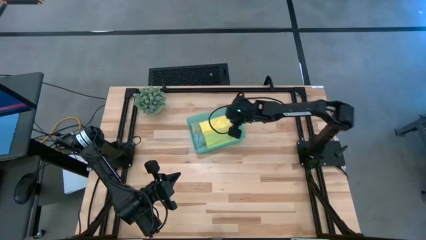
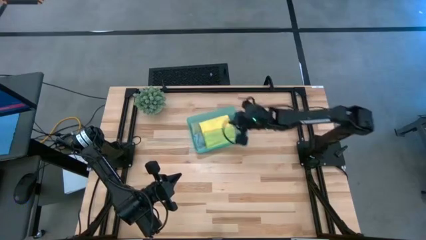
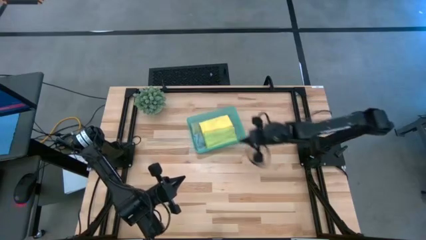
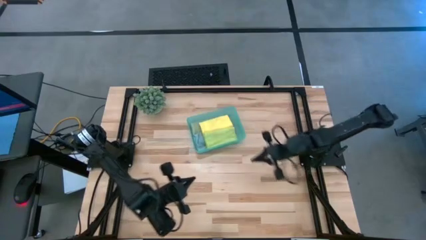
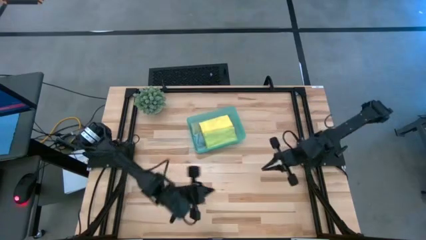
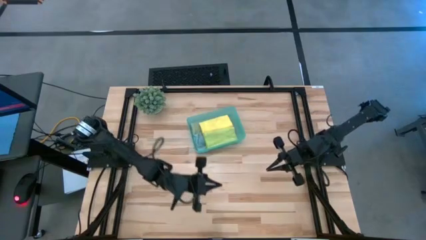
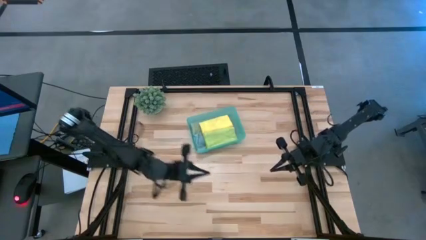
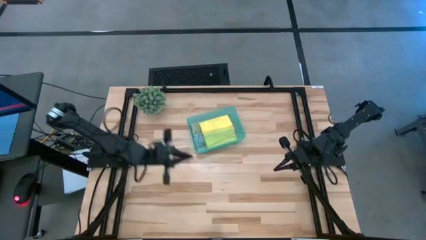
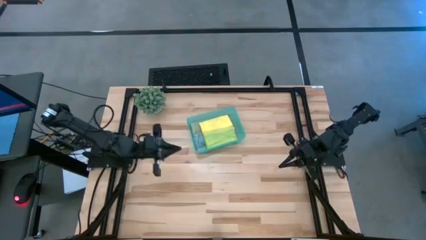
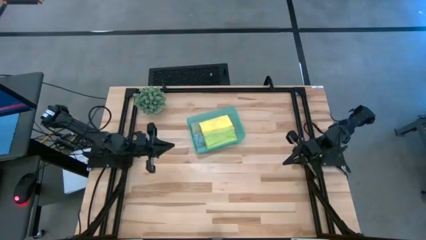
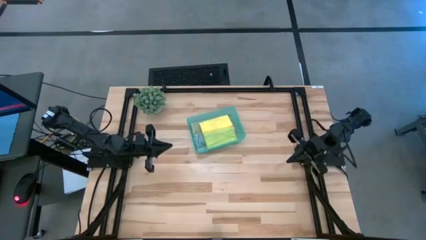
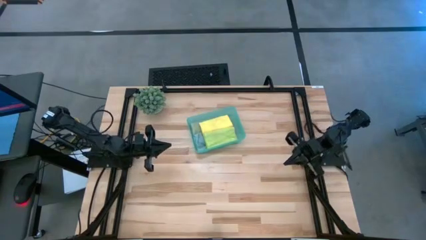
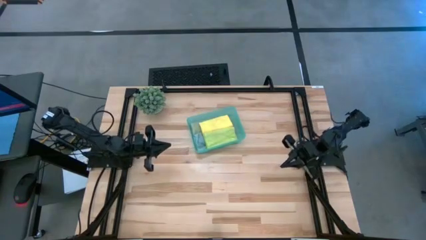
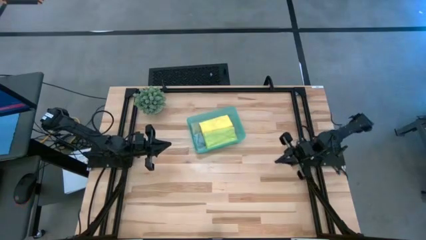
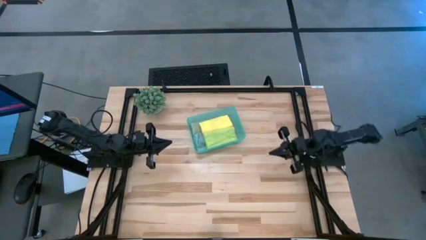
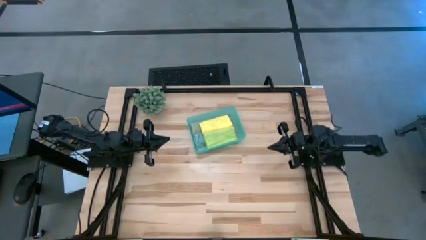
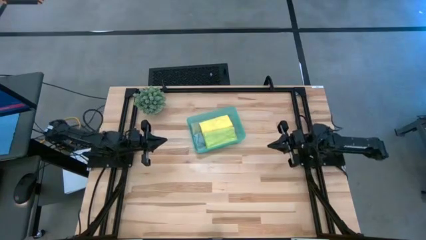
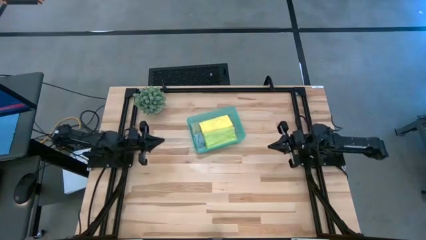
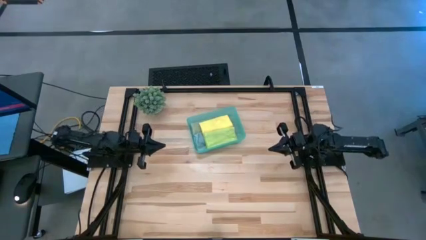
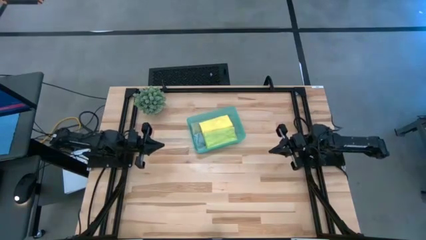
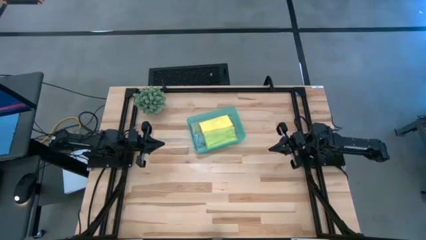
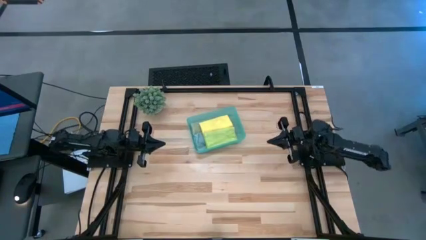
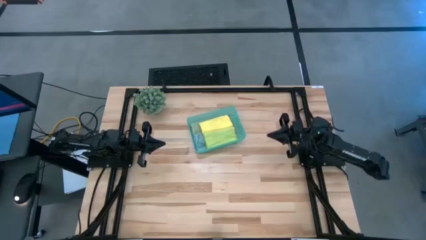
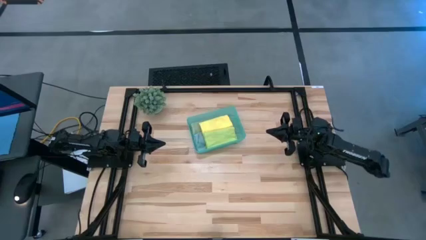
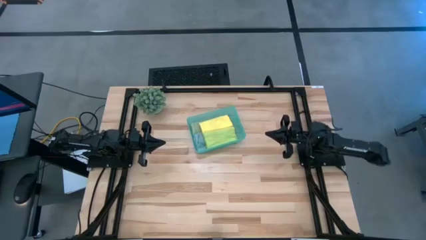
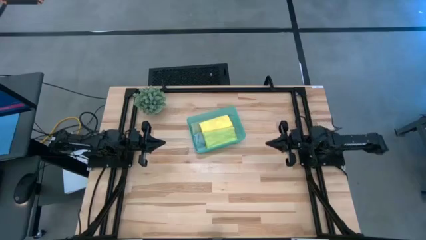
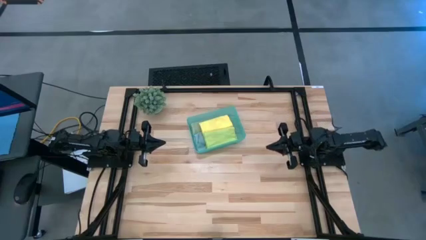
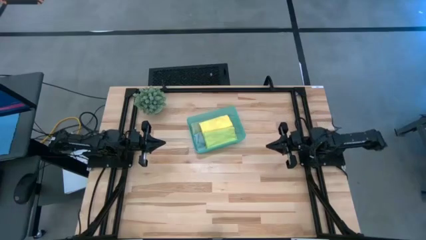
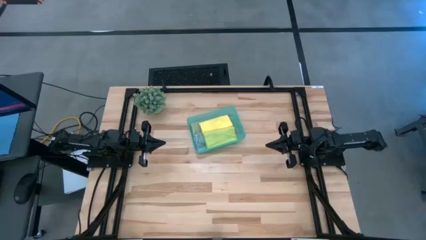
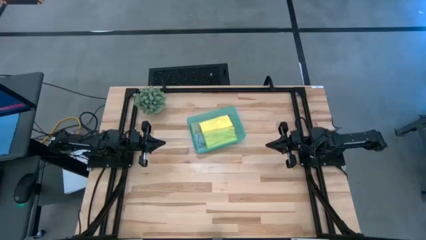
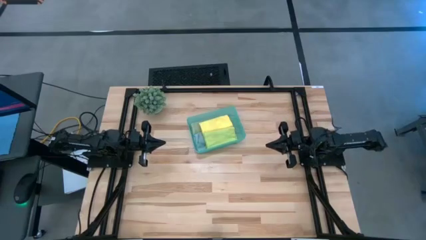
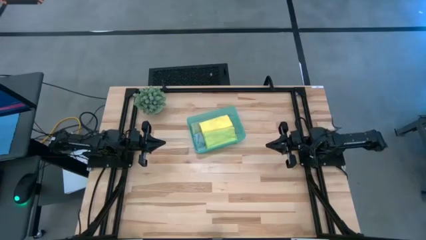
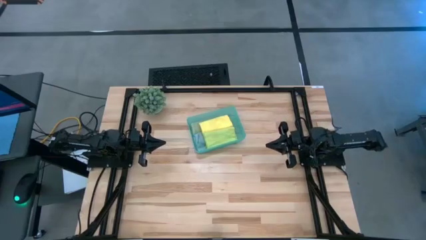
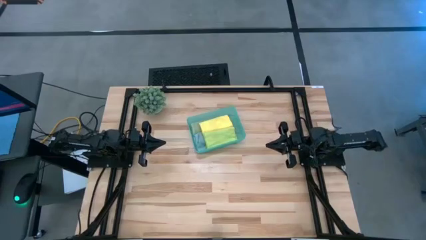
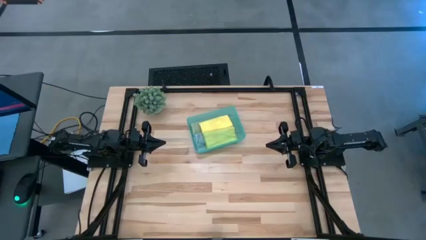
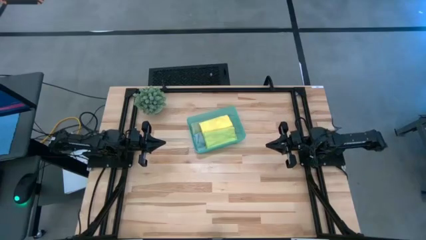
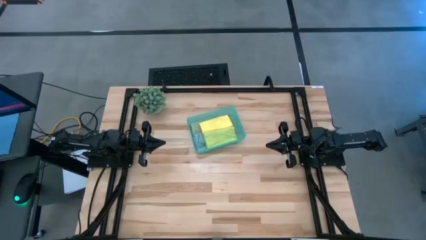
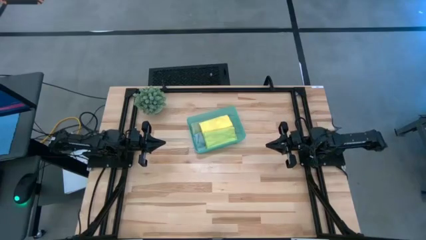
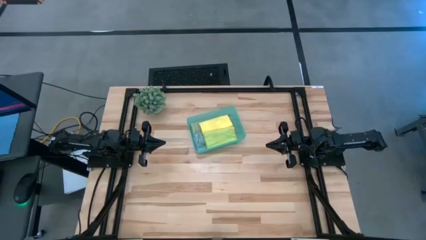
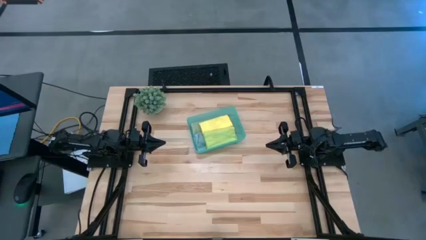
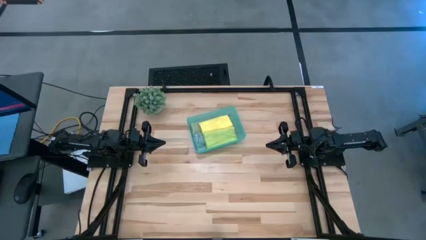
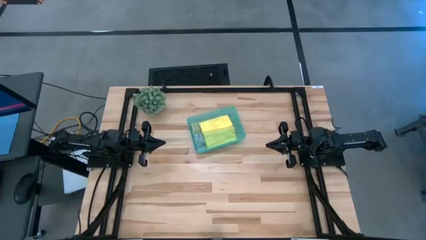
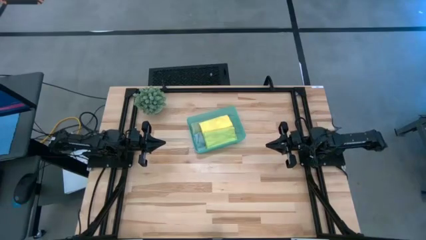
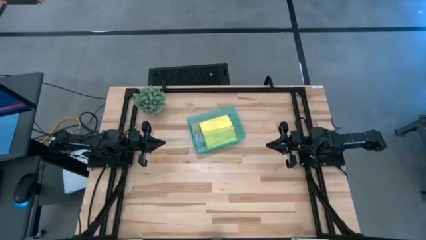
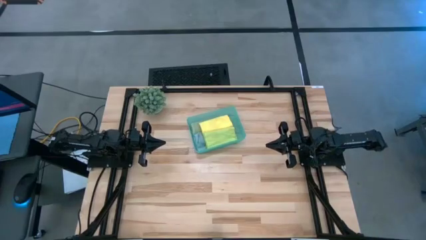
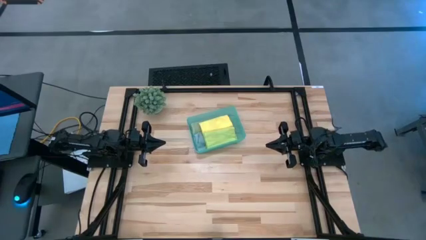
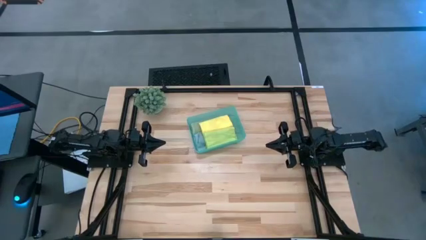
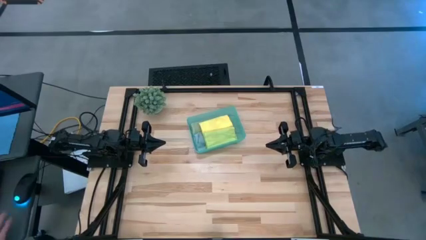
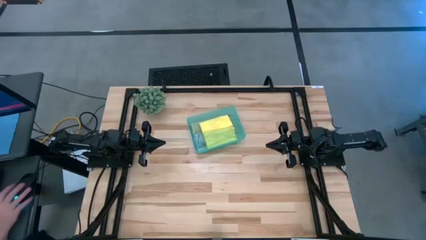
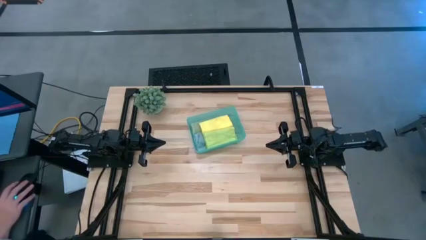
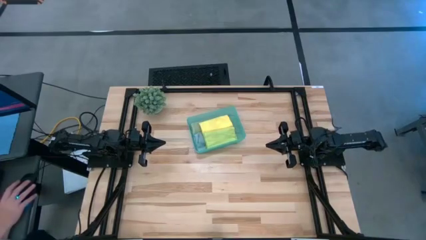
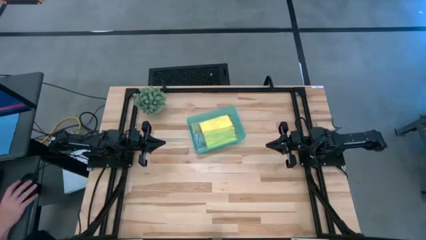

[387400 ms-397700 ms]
Task: Fold microfiber towels
Return to home position

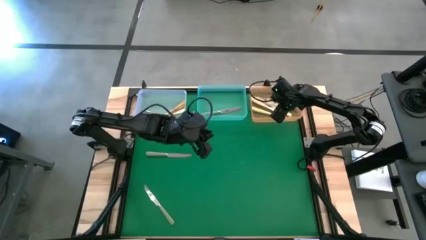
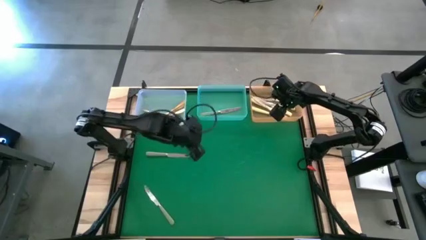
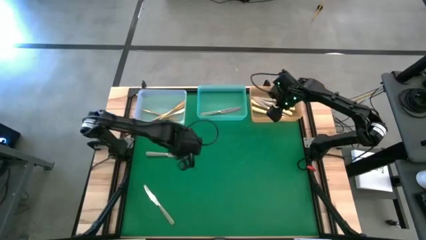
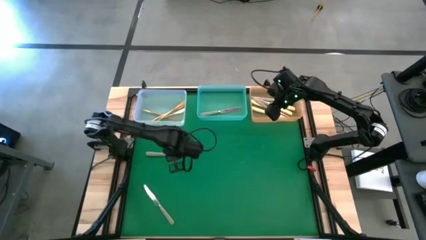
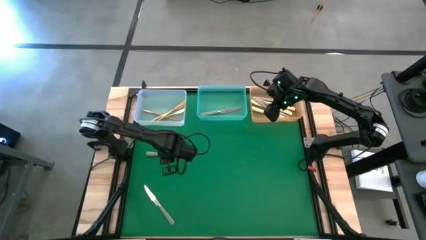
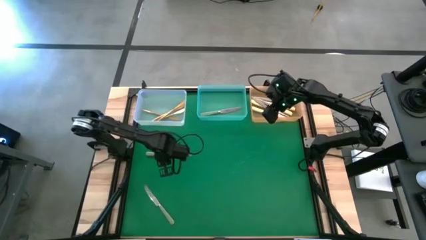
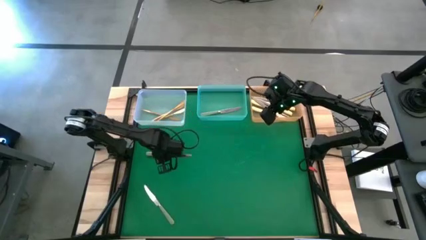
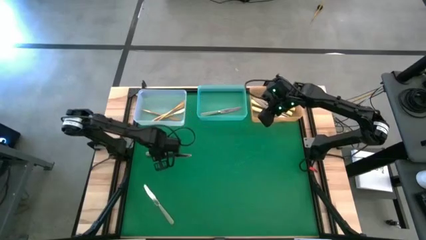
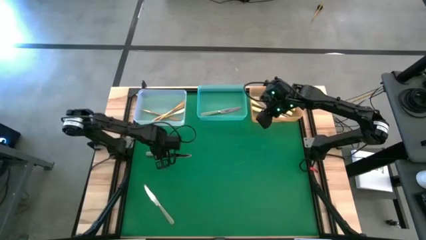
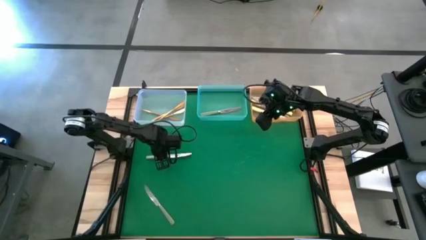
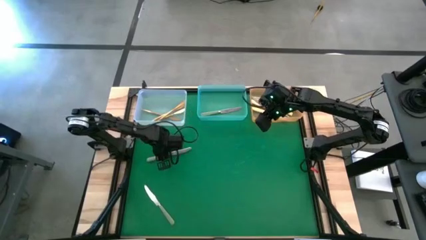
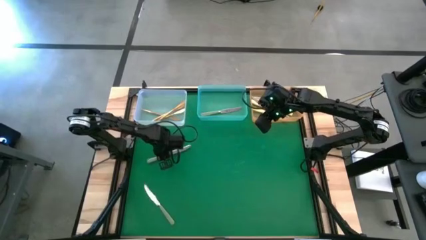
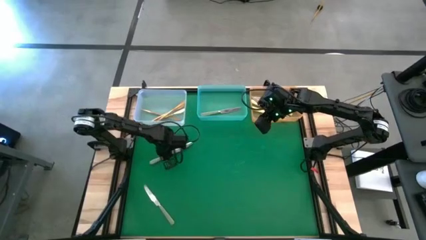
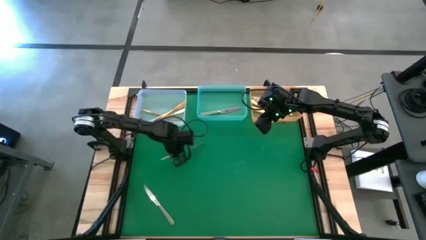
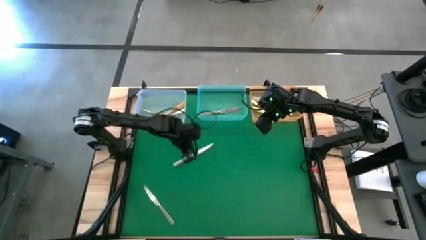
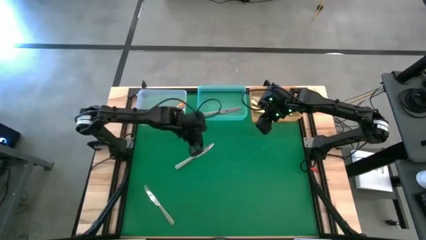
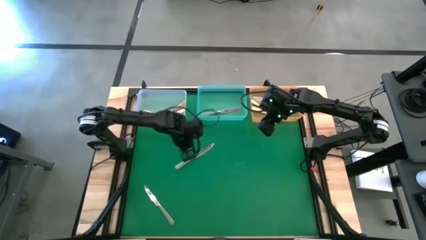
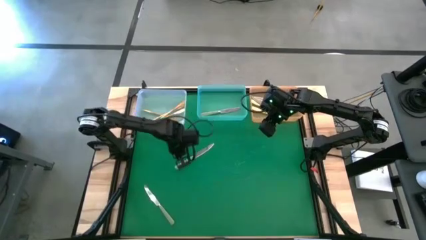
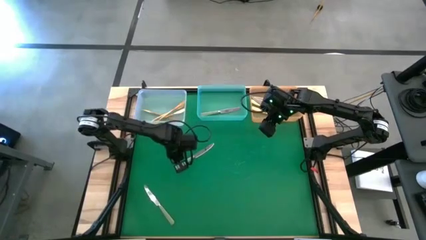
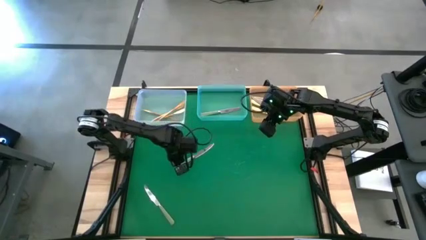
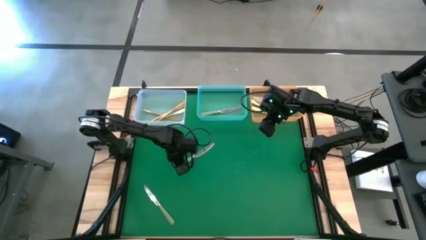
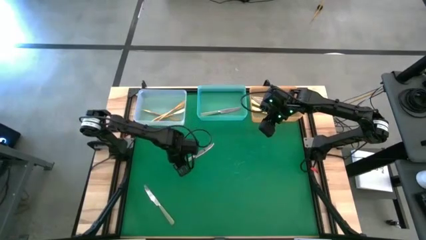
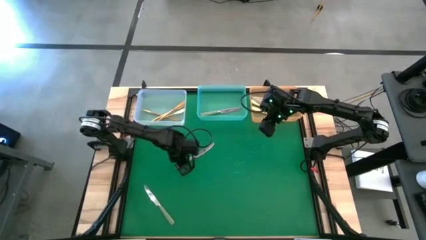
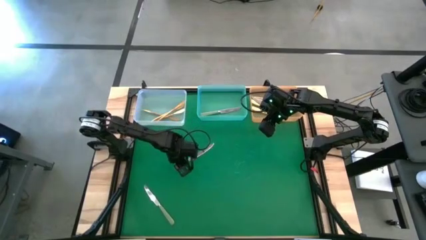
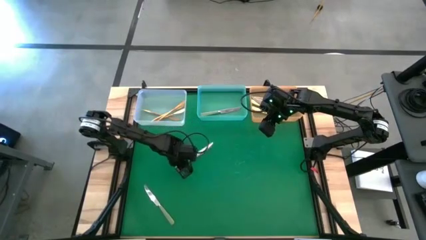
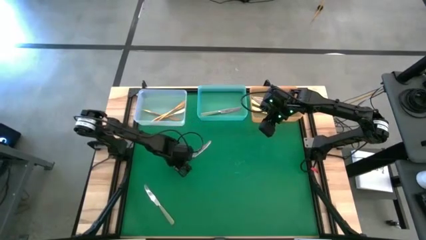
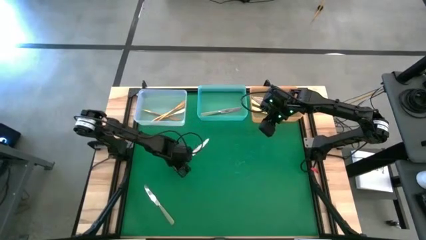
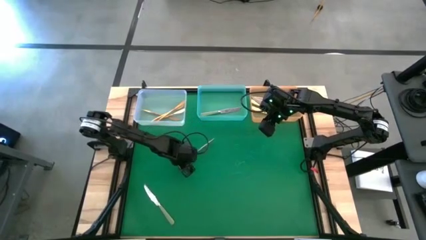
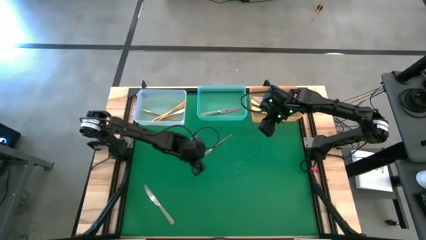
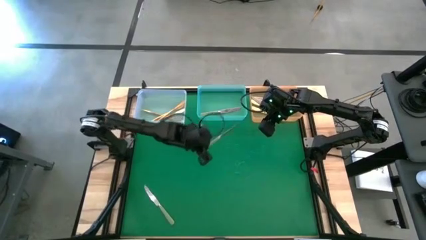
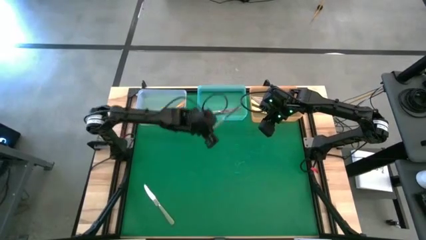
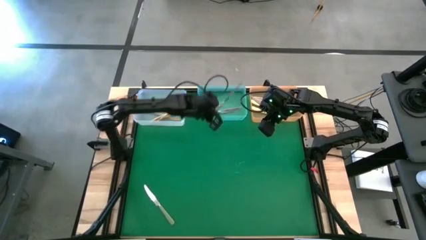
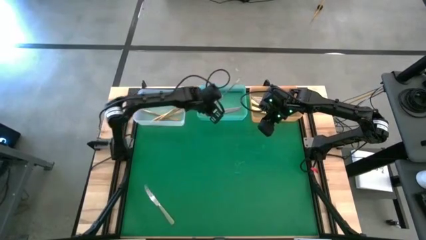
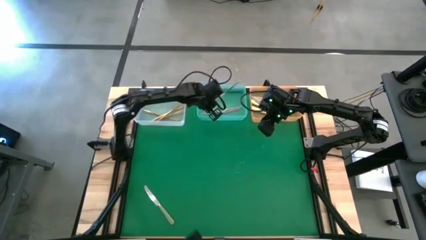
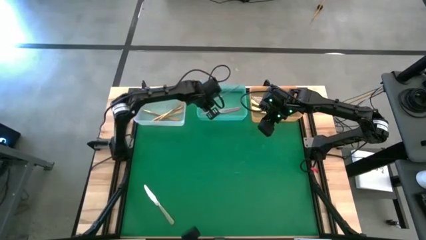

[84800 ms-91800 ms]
Task: Sort silverware by color (type)
Put the top green table knife into the blue transparent bin
